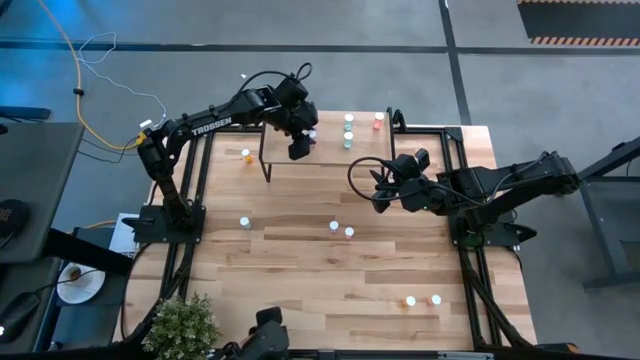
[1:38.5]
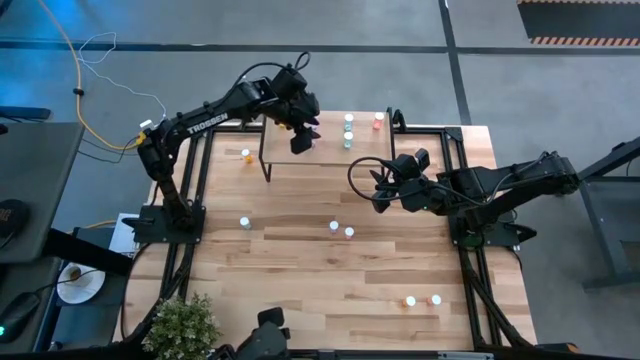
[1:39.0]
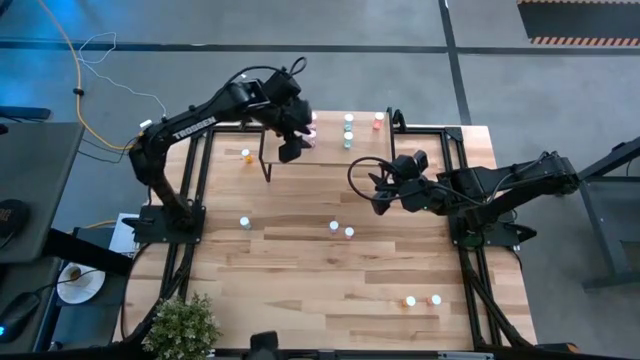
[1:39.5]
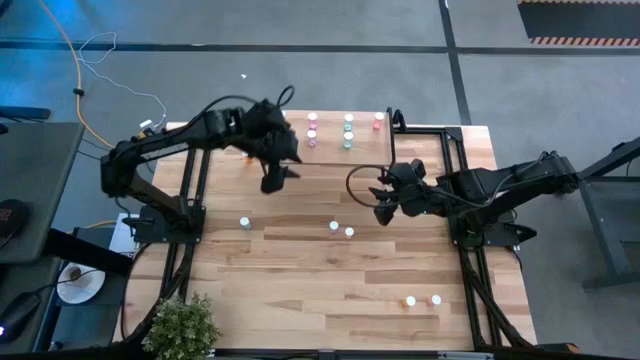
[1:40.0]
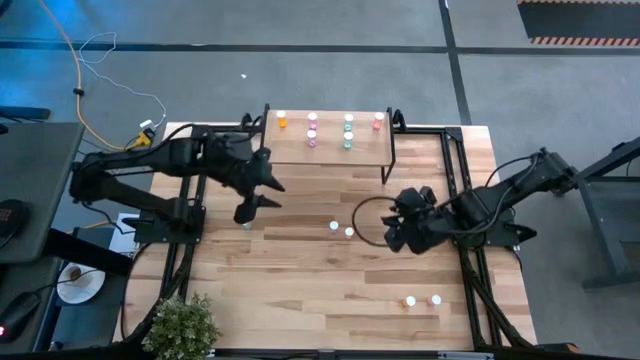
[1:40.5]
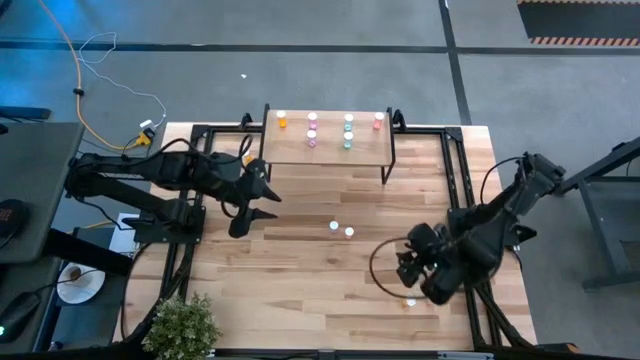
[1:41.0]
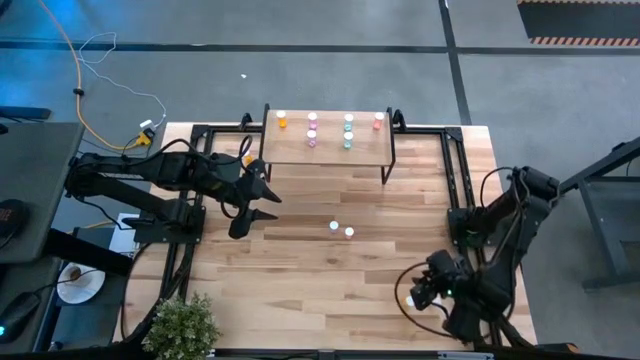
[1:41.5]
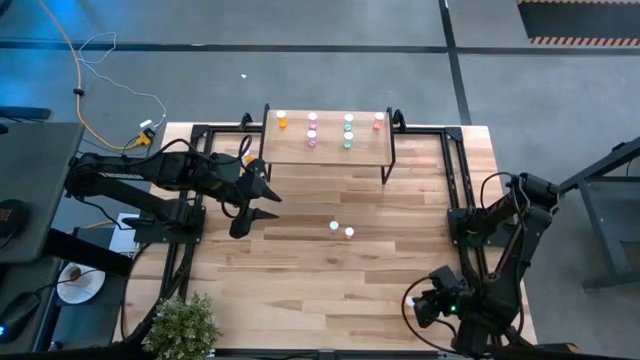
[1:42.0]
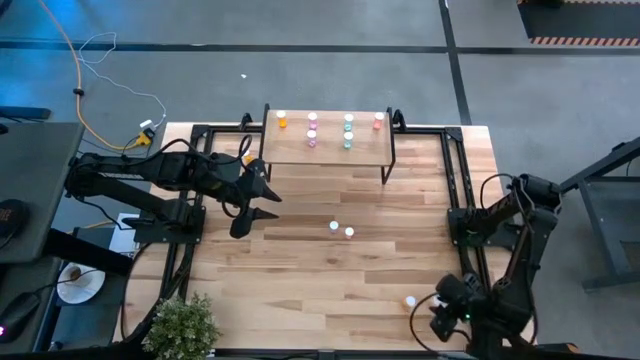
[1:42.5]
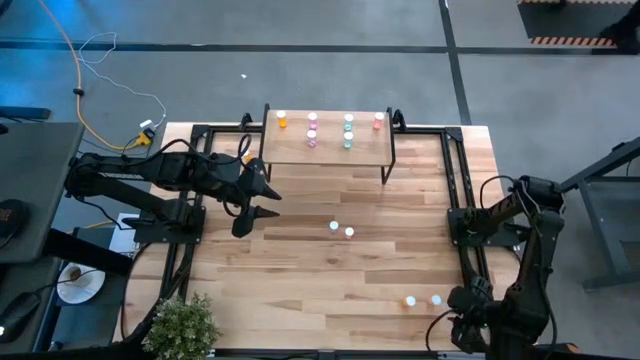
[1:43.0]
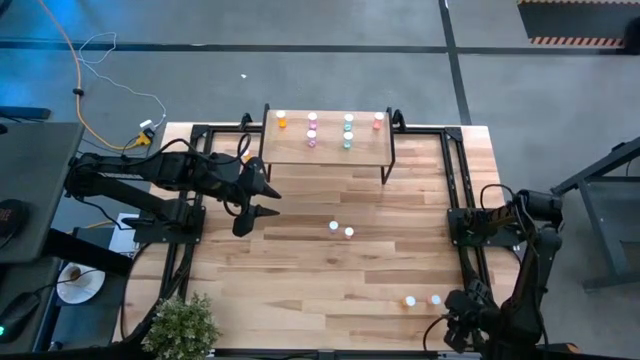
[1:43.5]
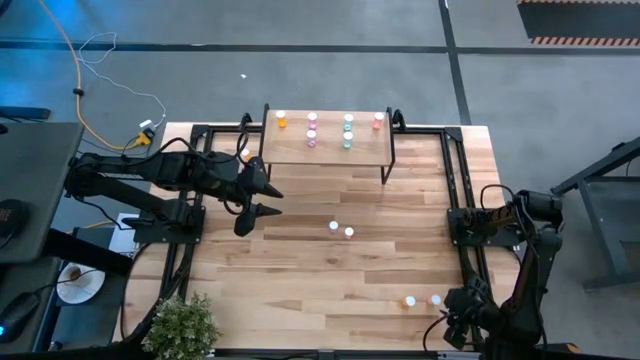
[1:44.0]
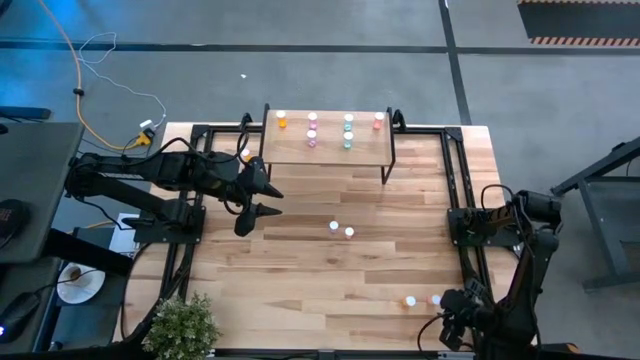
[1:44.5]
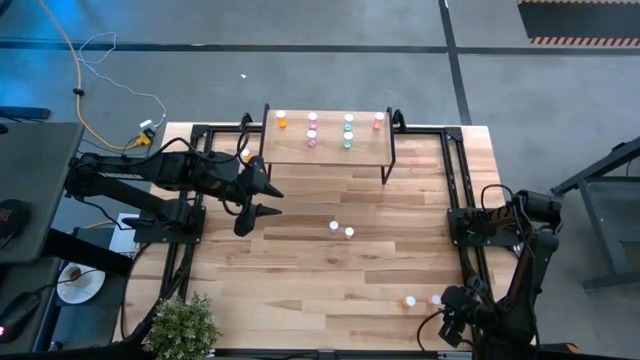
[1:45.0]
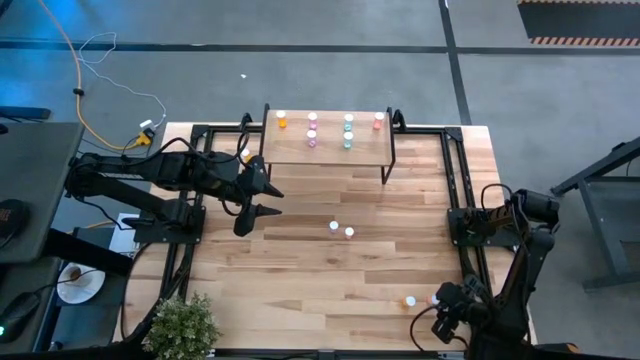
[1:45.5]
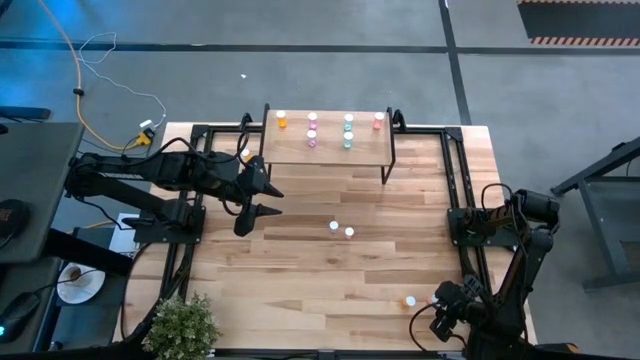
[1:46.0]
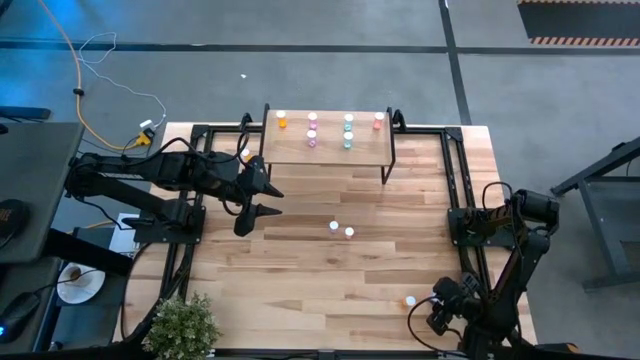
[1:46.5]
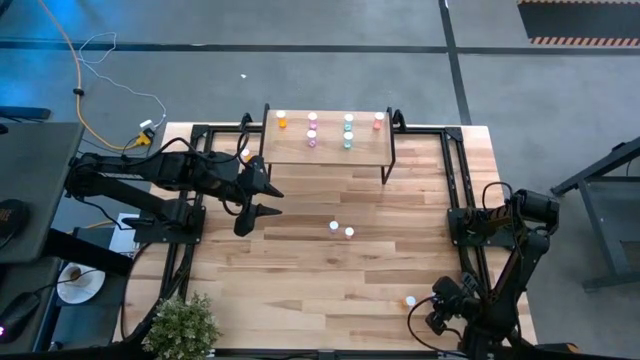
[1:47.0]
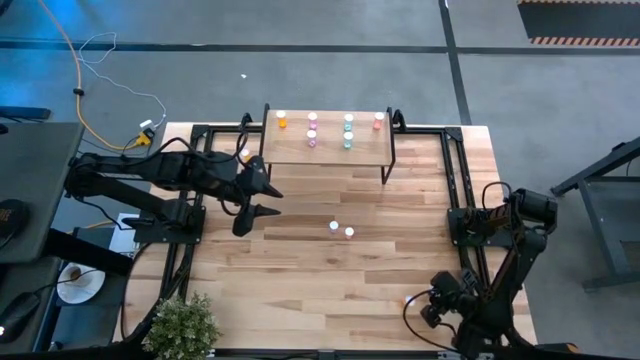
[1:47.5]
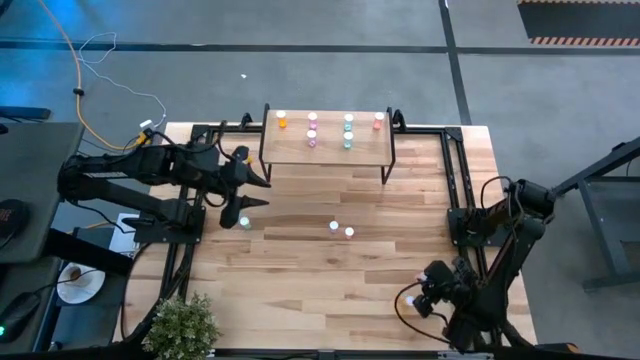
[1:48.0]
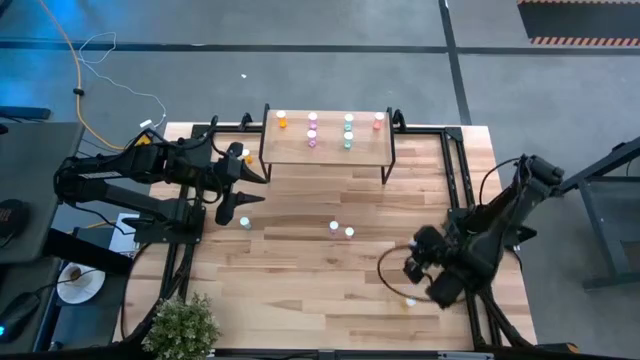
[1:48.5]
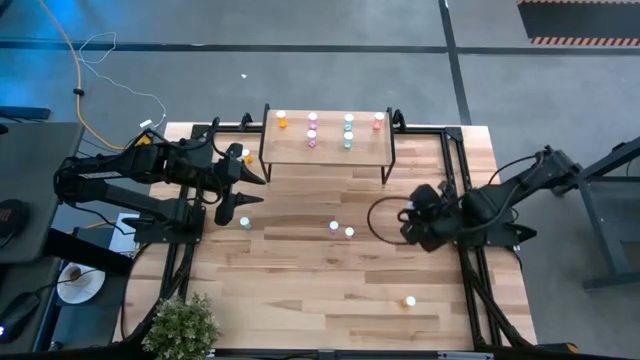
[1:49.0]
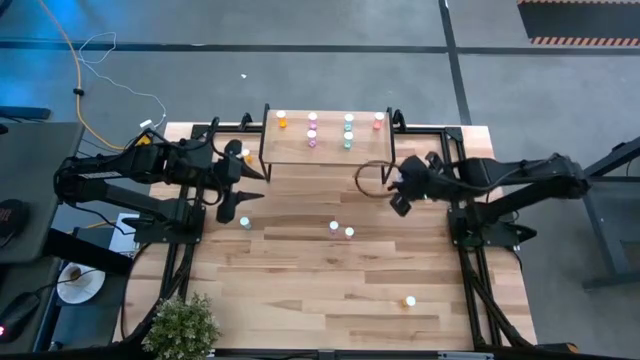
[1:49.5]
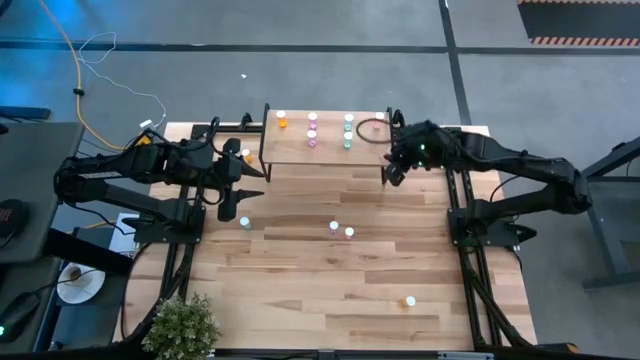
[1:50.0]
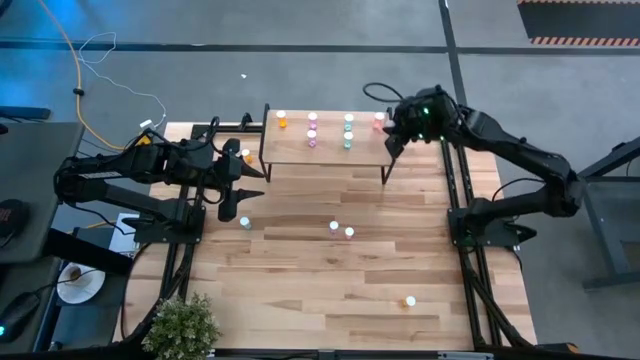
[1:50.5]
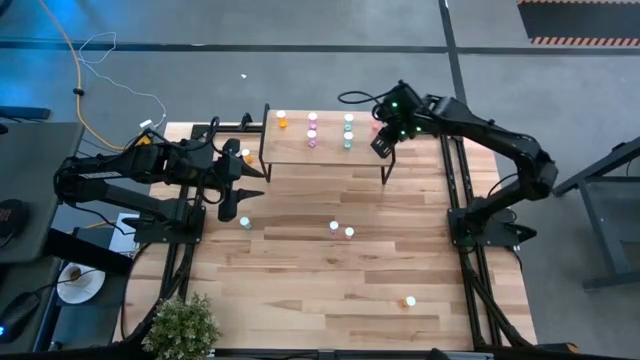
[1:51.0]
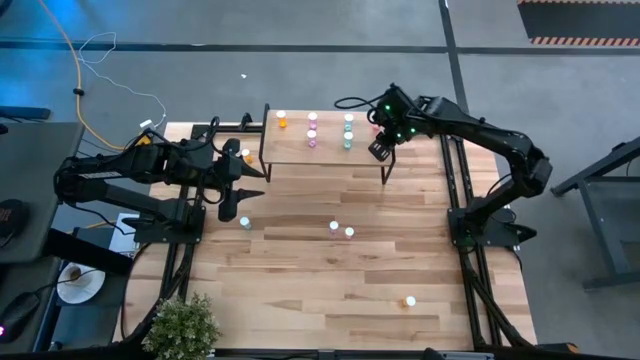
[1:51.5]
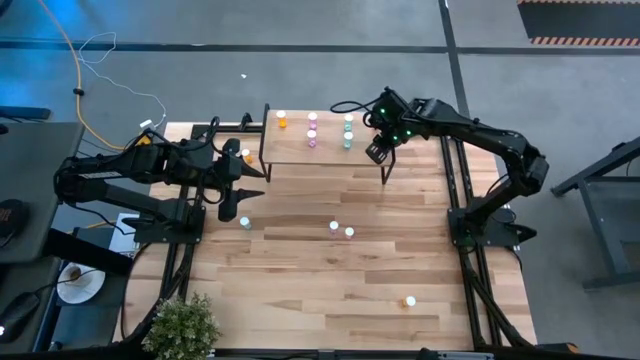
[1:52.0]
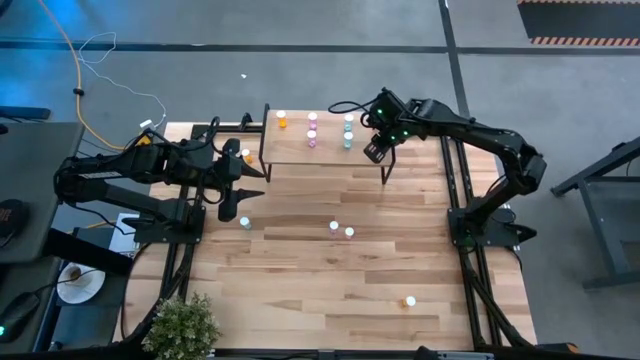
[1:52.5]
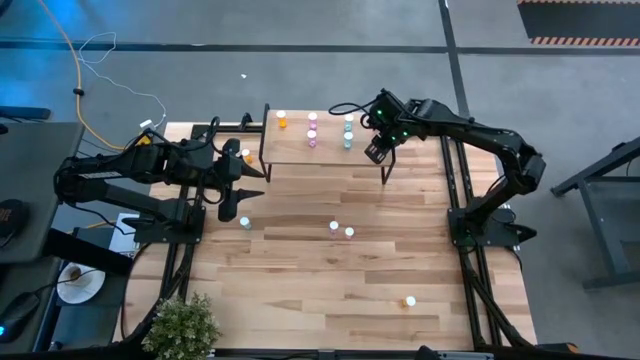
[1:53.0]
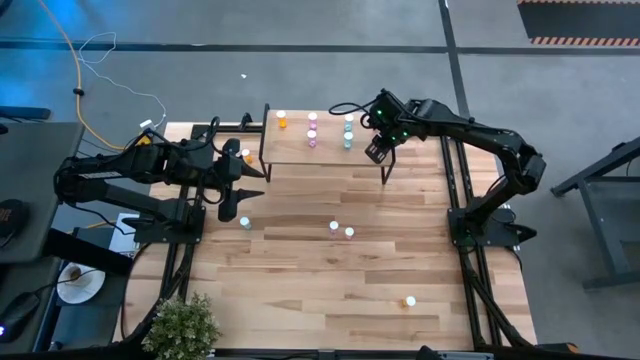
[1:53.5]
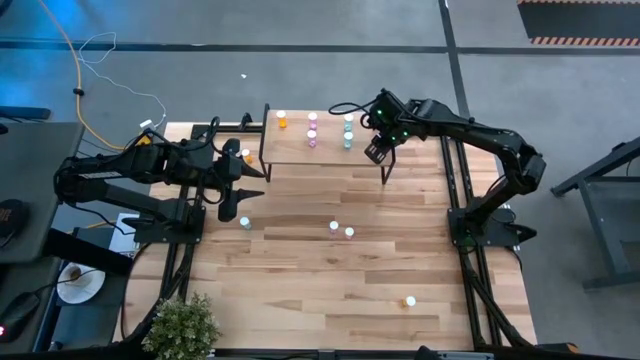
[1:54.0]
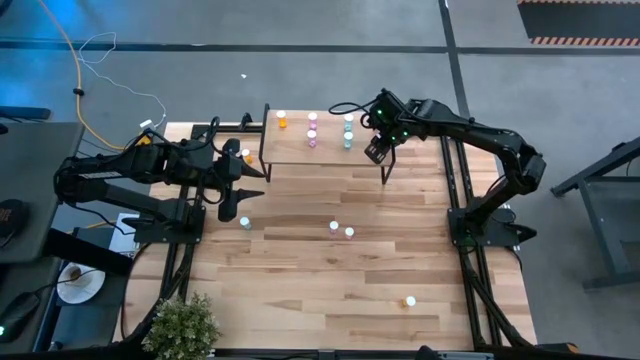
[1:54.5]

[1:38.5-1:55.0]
Task: Pick and place medicine bottles onto shelf by color
Put the bottom red pill bottle on the shelf aligned with the other red pill bottle

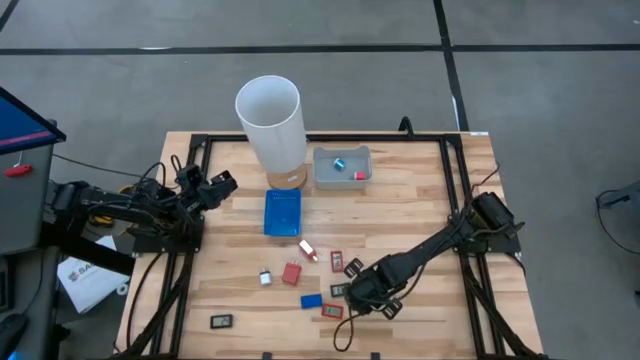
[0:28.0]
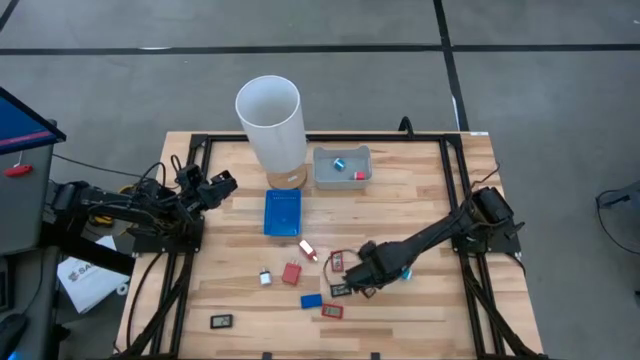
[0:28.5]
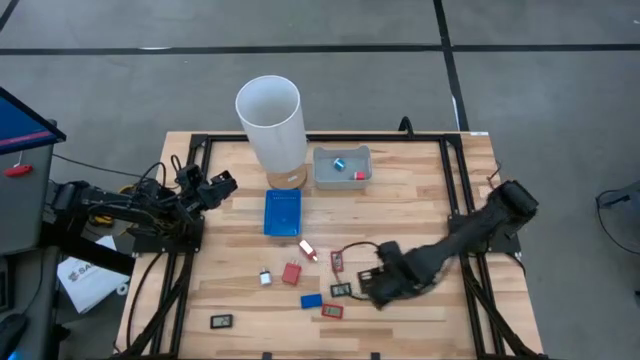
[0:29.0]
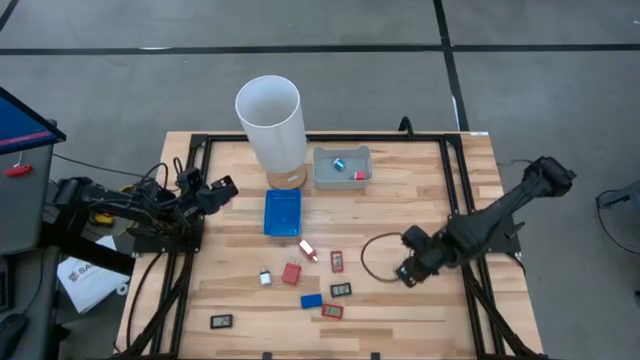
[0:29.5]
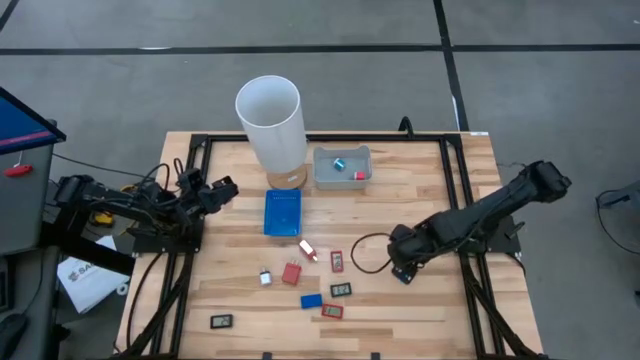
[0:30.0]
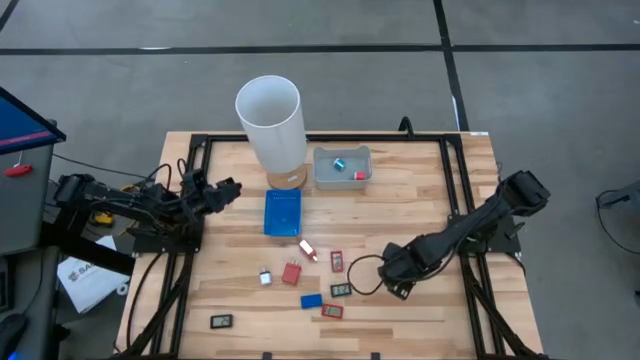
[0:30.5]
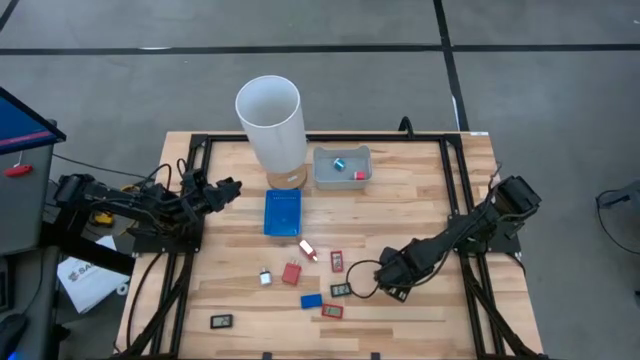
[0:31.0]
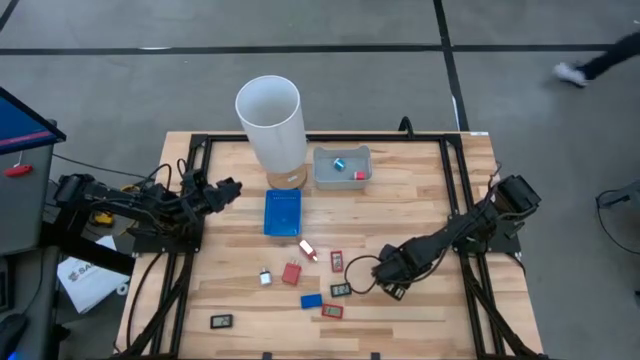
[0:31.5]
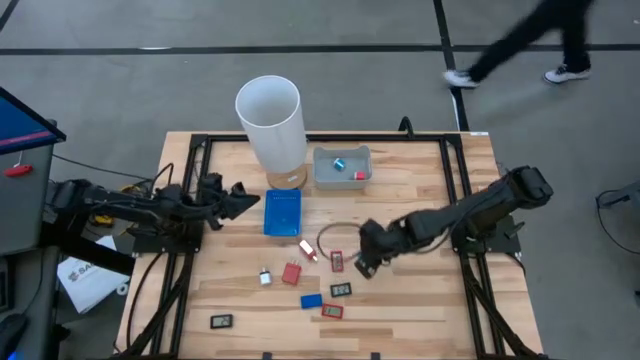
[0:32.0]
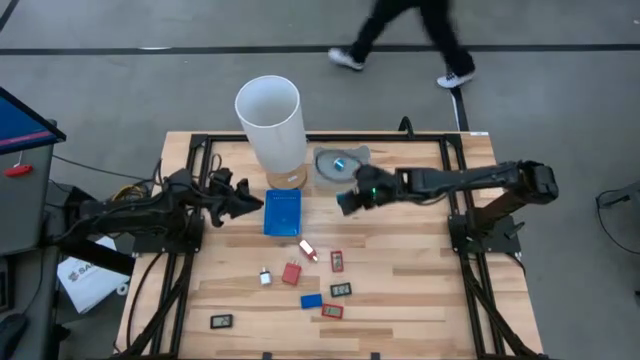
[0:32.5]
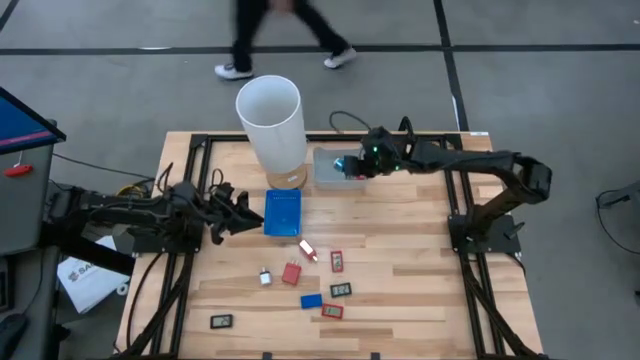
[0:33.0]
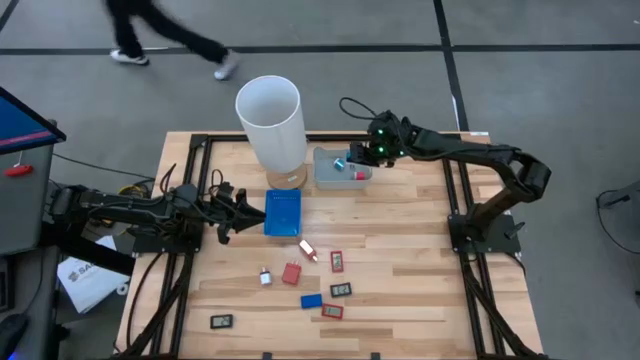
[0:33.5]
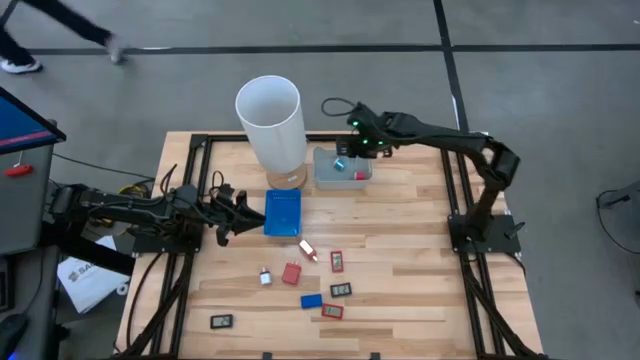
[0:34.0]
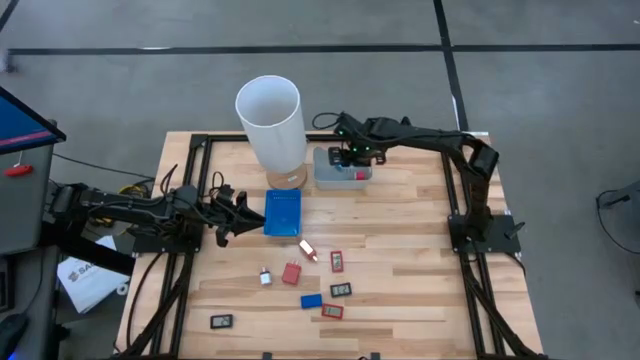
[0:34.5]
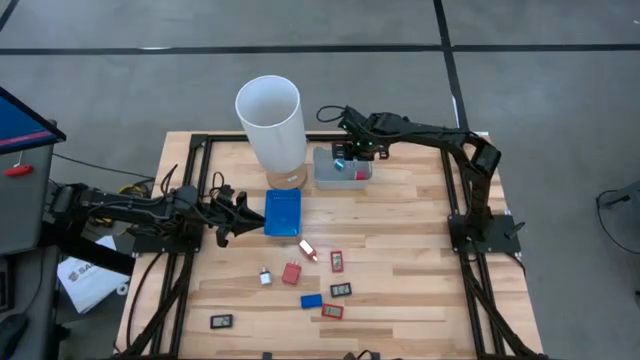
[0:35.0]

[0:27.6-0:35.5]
Task: Pick & Place Office items
Put the blue charger adapter into the gray bin
